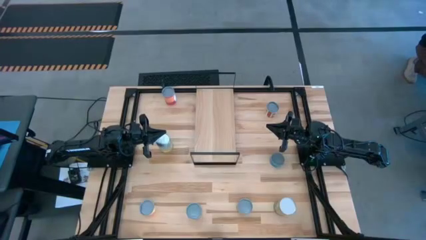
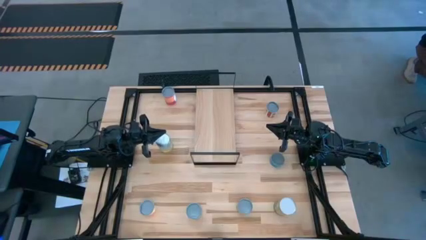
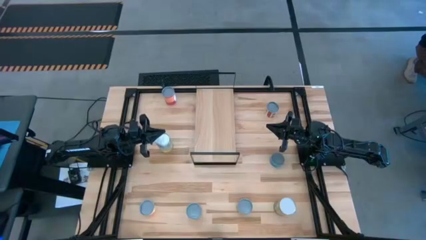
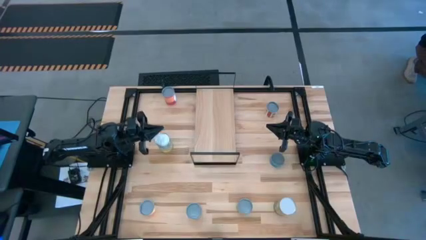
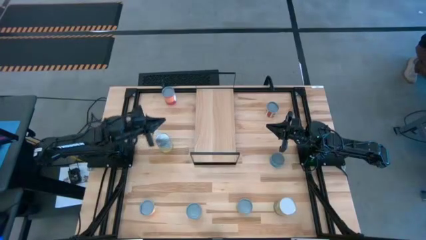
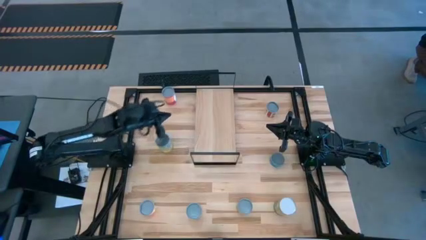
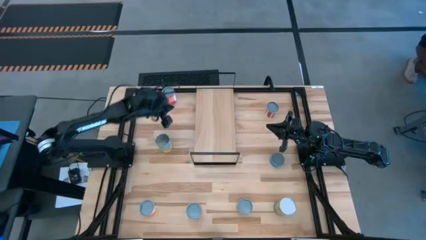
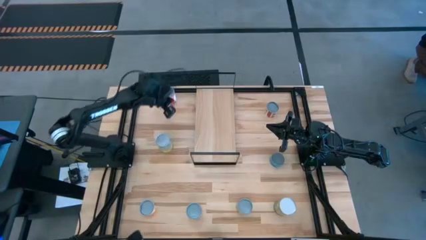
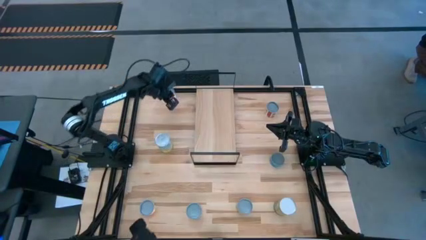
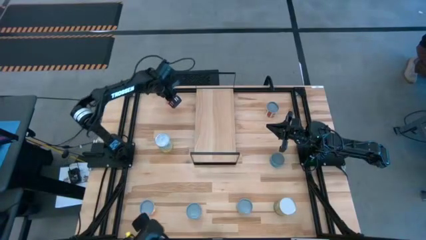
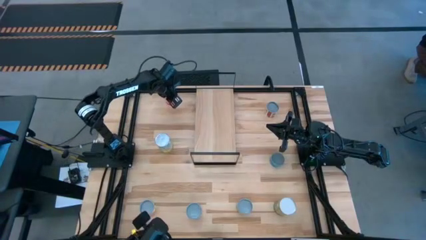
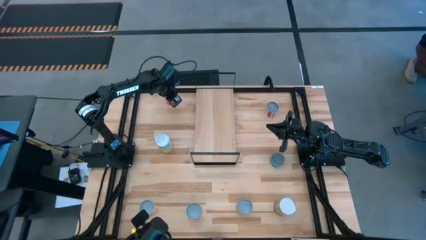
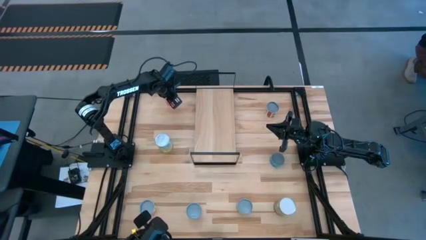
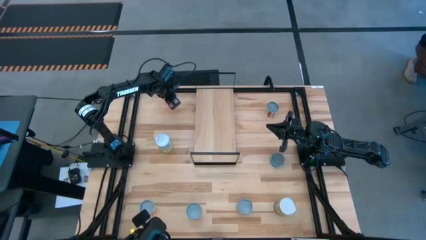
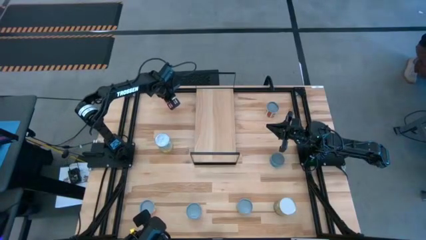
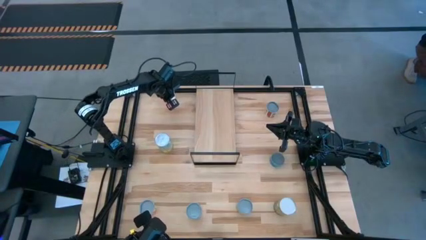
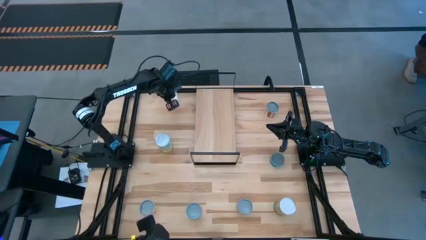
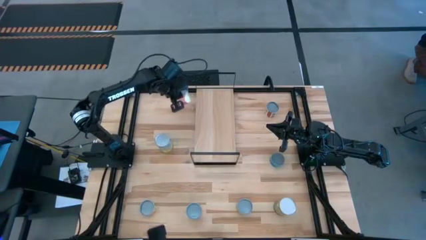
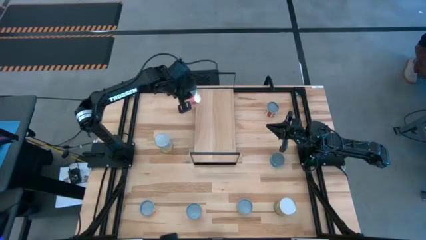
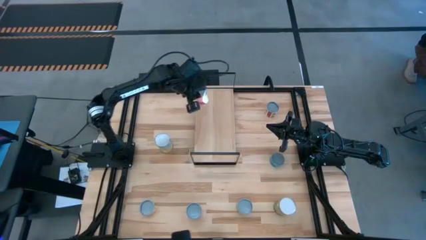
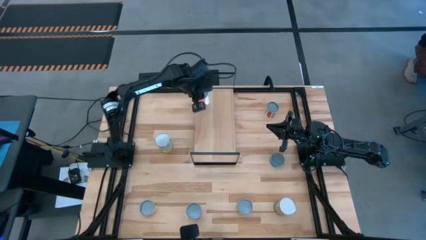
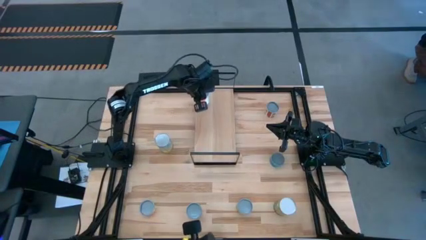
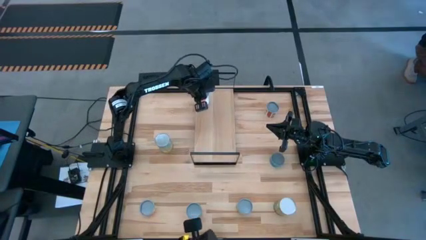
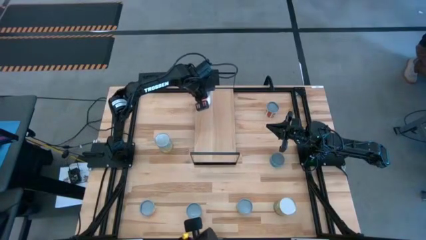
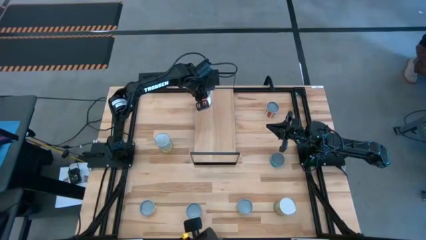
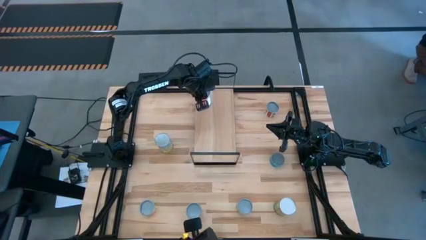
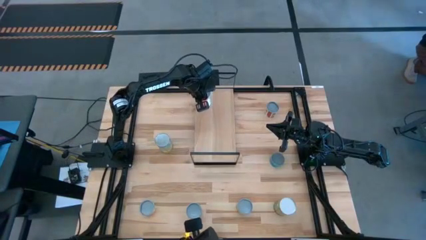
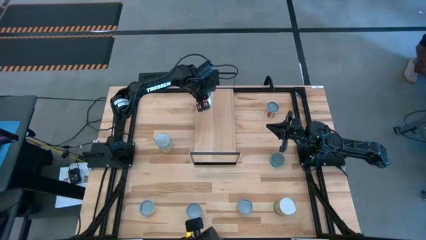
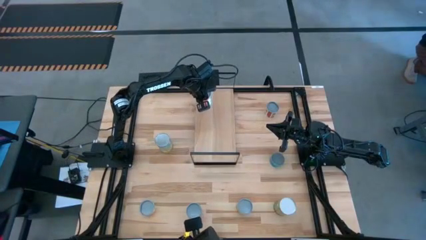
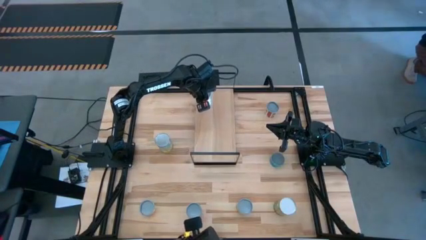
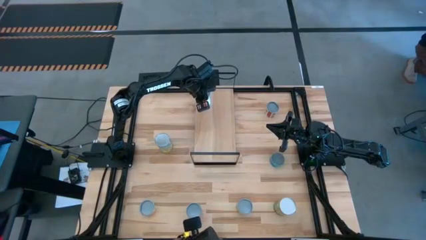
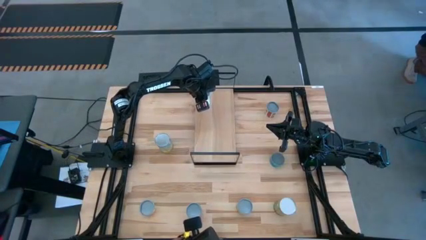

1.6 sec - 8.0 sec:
Task: Pick and place cans onto a shelf
Put the large canned mixed fruits on the shelf

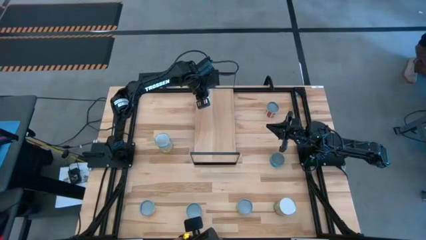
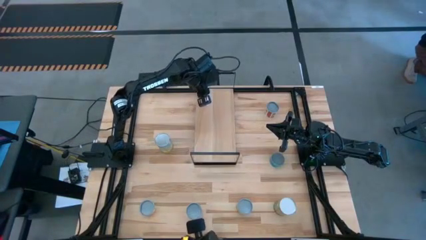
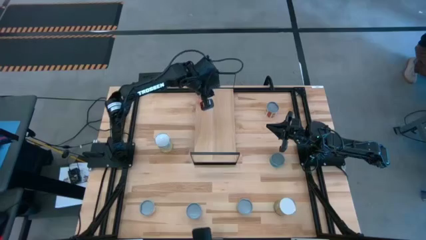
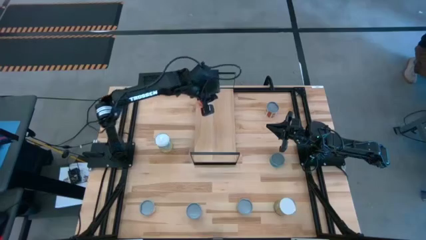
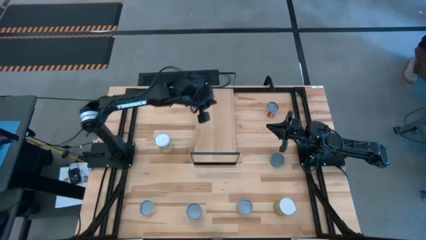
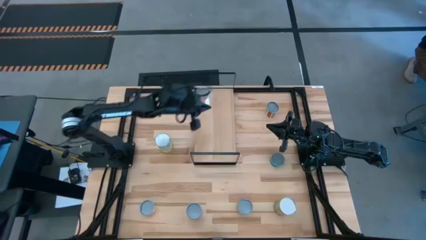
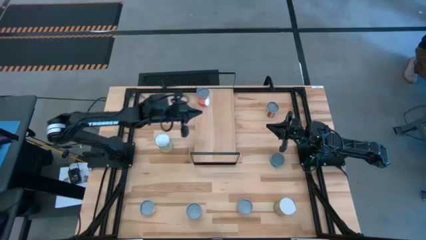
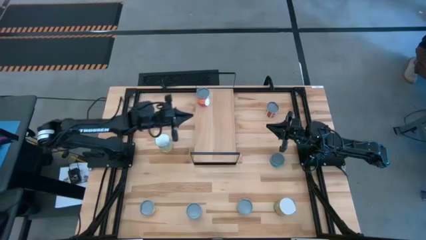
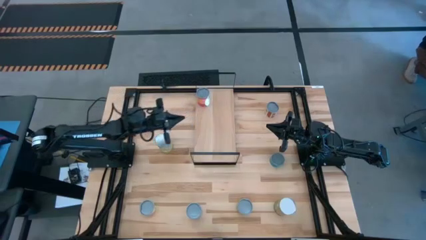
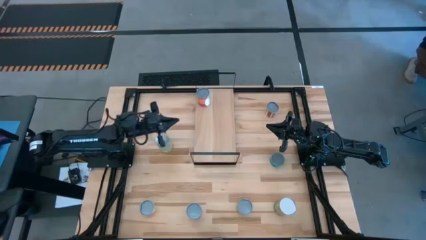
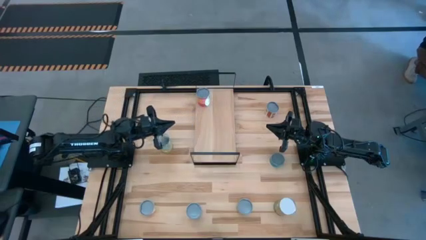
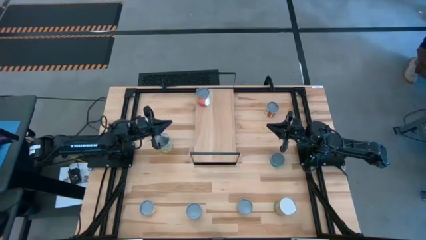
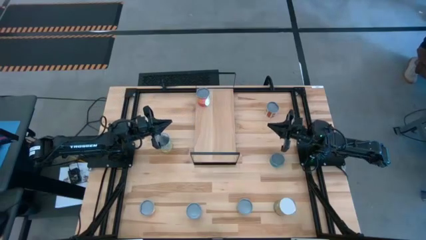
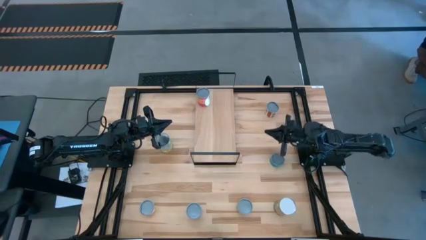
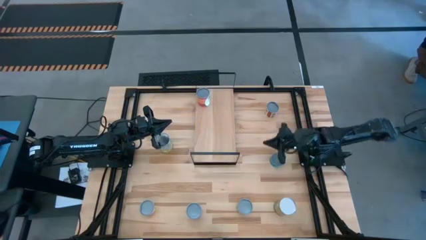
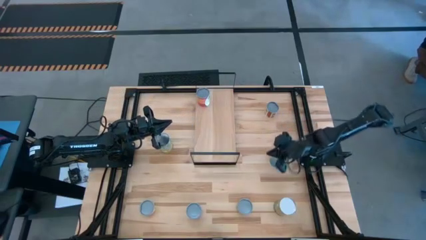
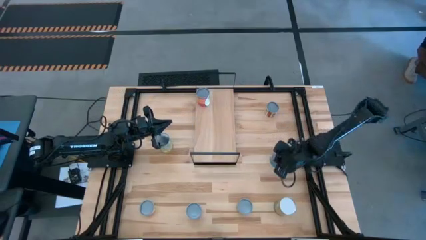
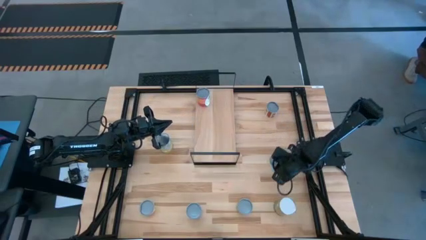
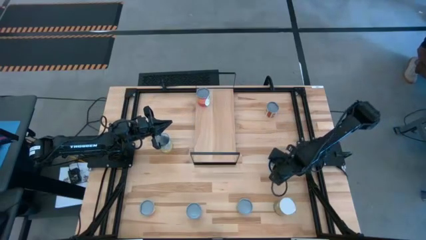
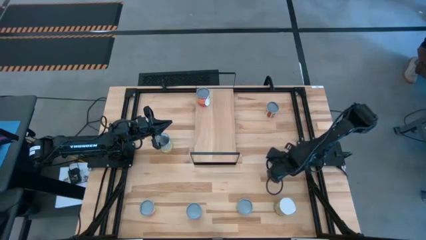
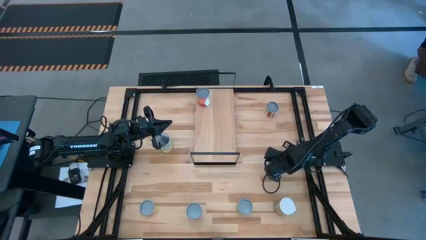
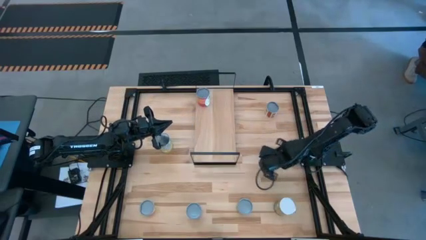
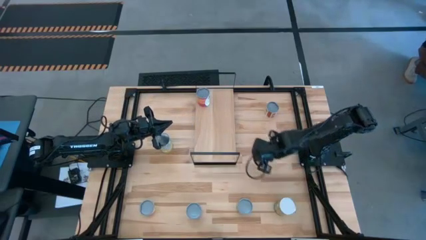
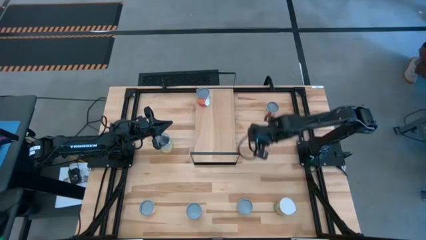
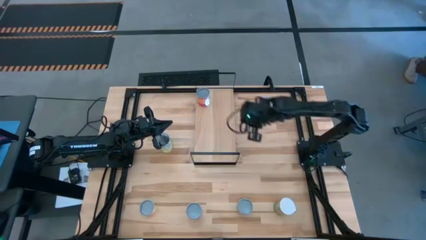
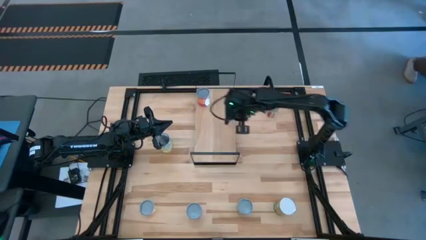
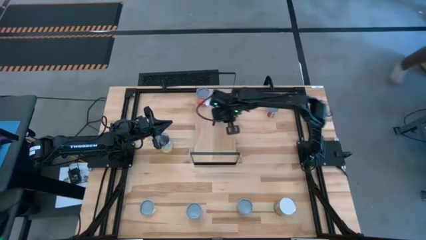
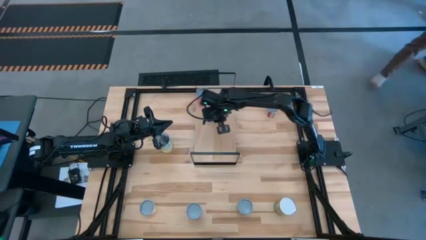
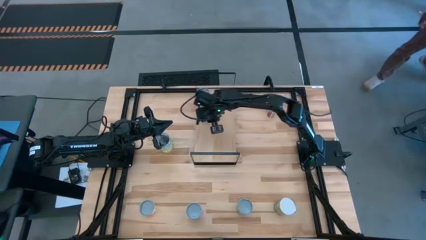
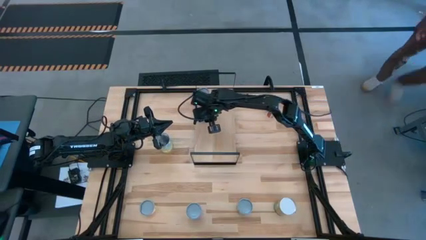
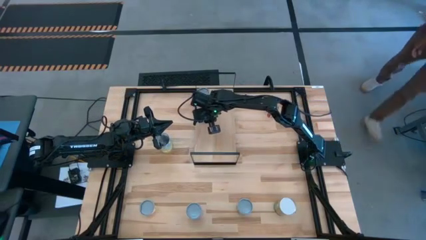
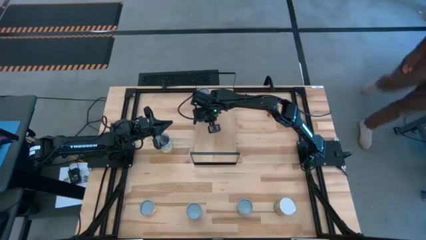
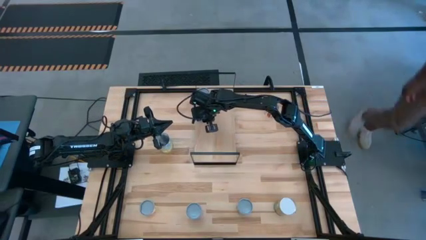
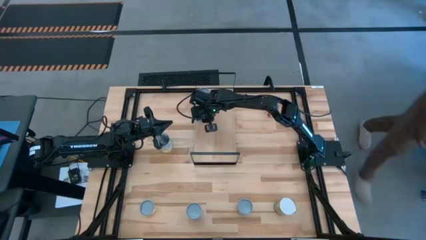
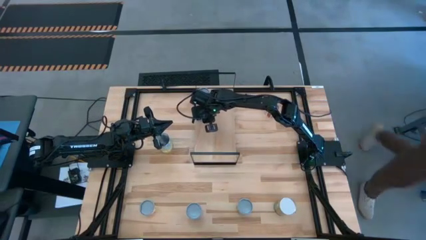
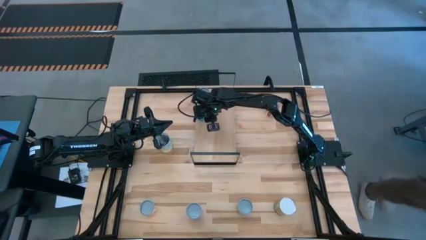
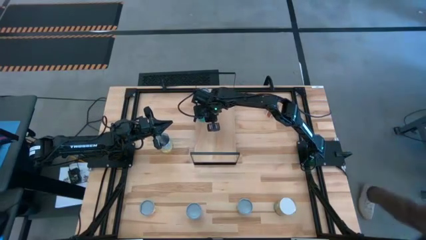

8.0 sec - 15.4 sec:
Put the small tuna can on the shelf

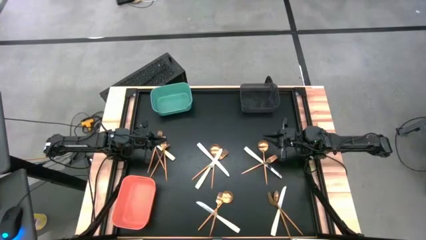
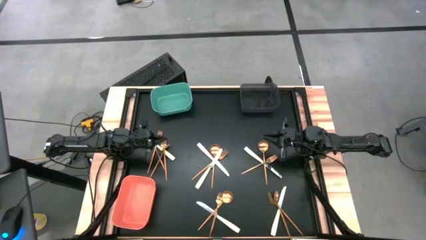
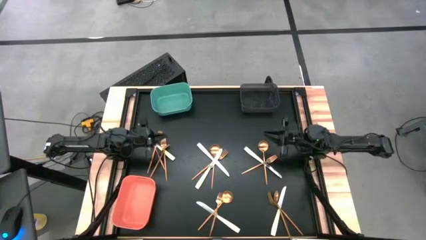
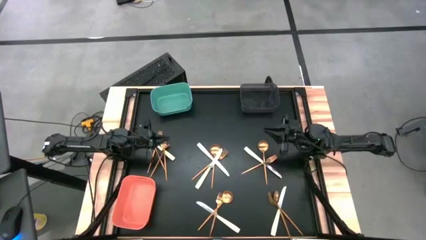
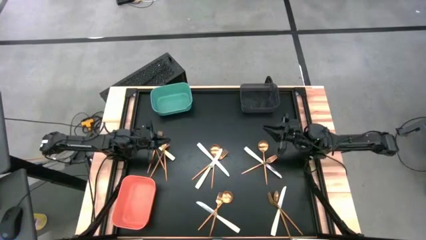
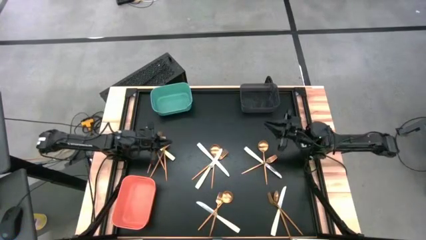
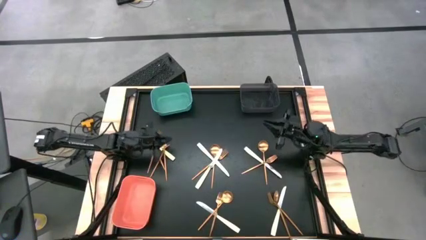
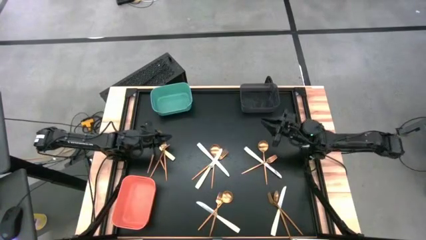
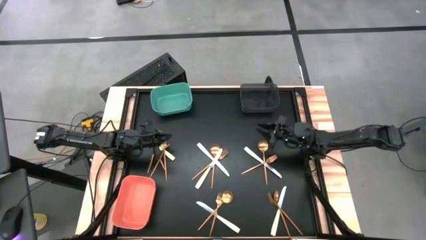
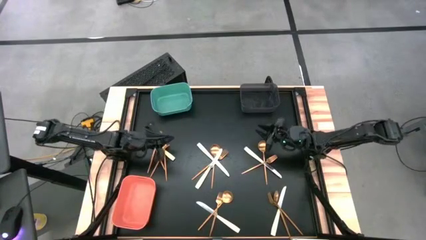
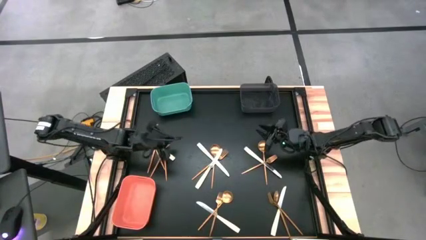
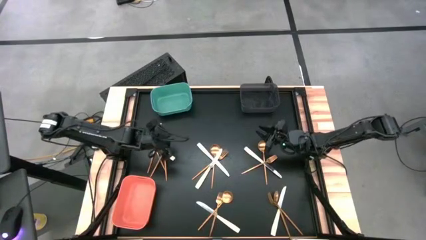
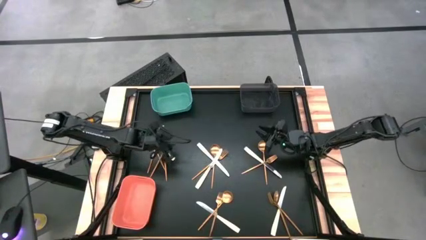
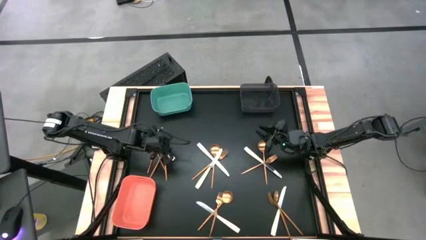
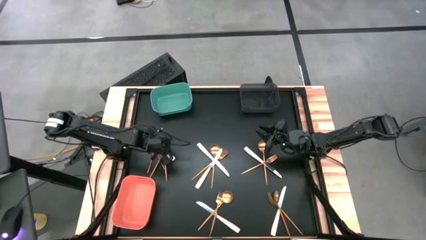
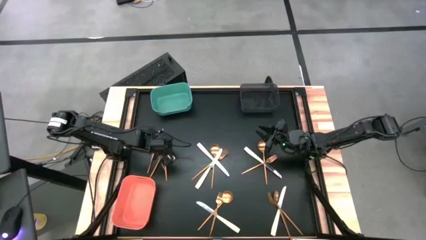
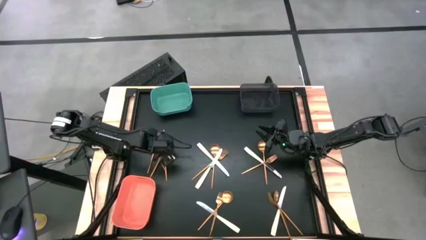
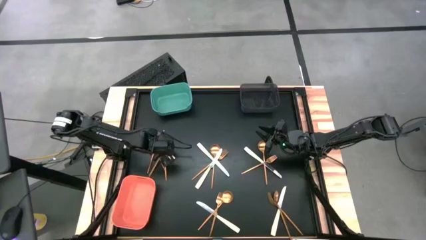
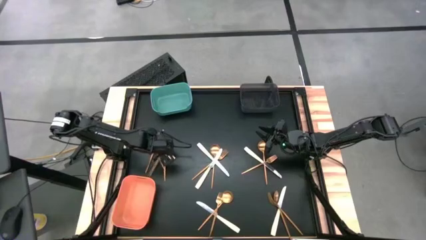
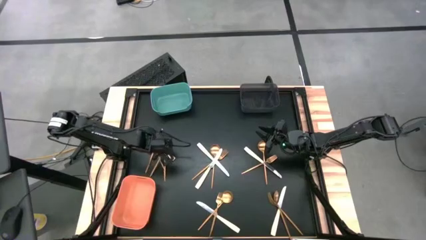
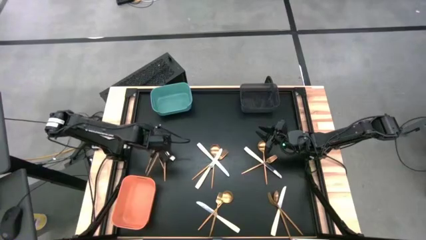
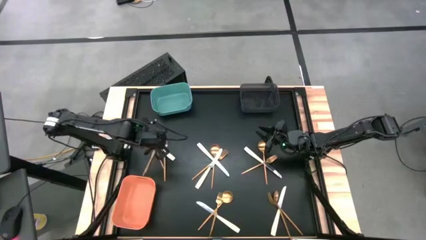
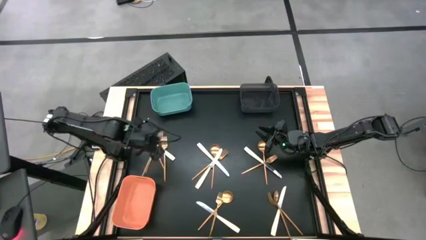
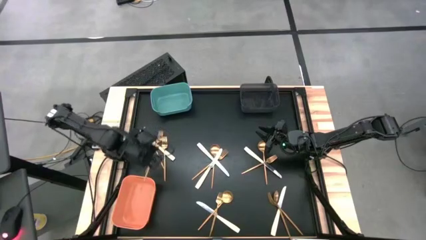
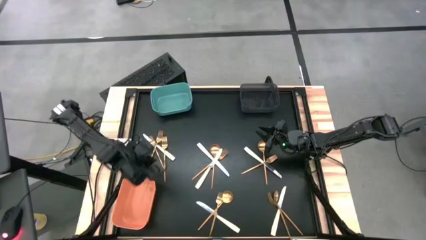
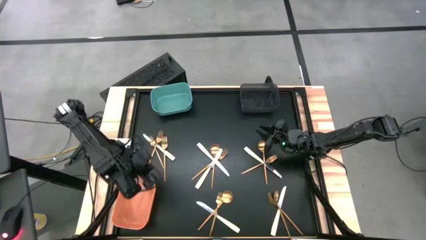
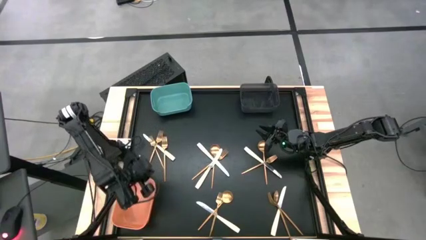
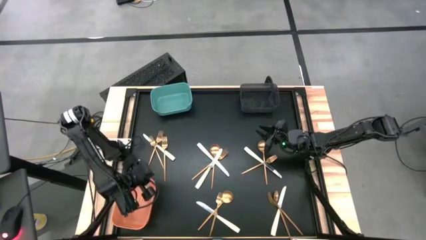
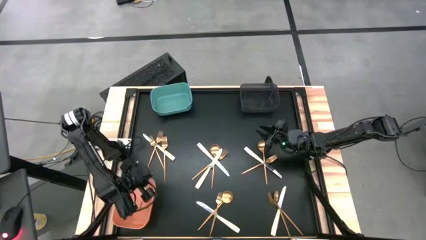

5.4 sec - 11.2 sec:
Task: Sort silverware by color (type)
Put the gold fork into the orange bin
